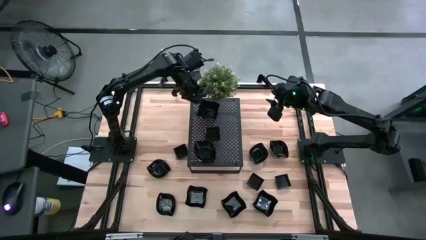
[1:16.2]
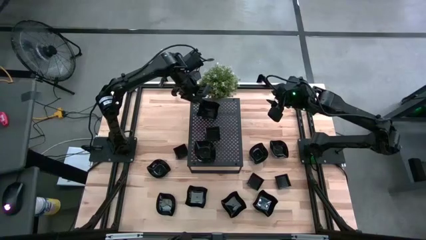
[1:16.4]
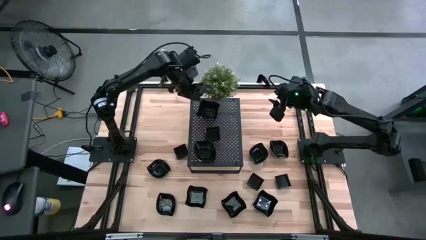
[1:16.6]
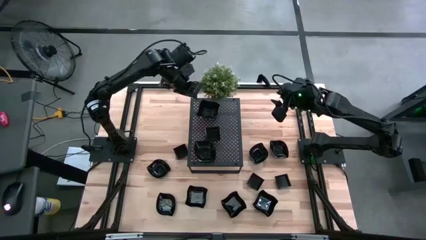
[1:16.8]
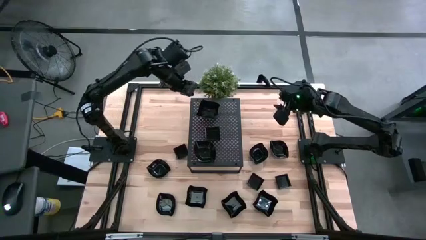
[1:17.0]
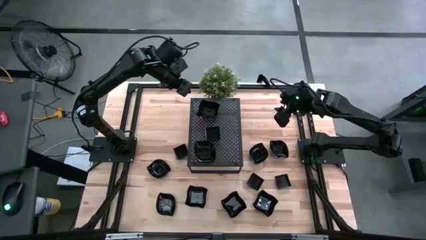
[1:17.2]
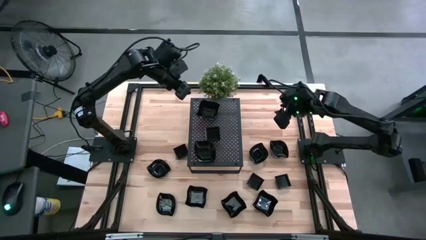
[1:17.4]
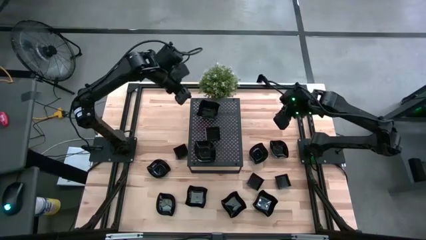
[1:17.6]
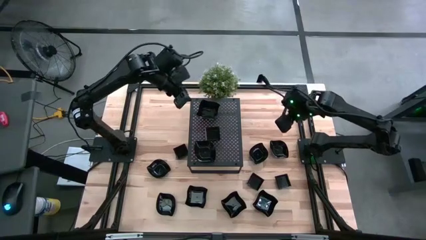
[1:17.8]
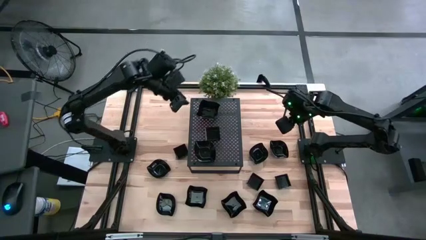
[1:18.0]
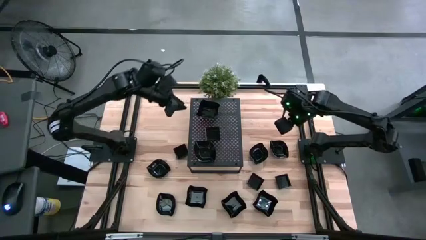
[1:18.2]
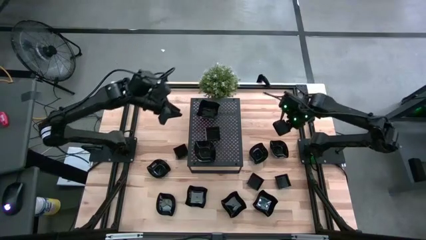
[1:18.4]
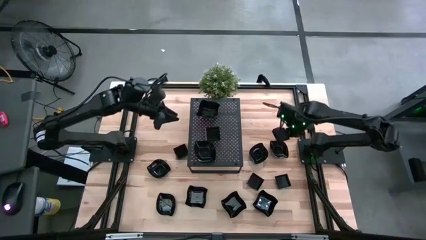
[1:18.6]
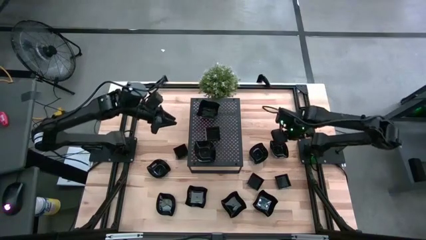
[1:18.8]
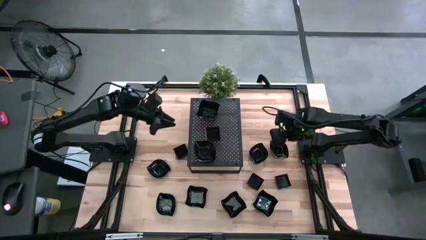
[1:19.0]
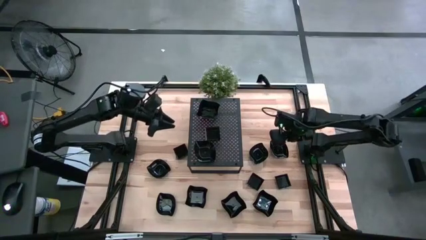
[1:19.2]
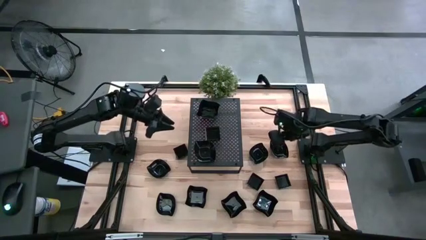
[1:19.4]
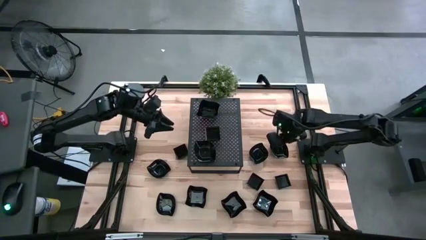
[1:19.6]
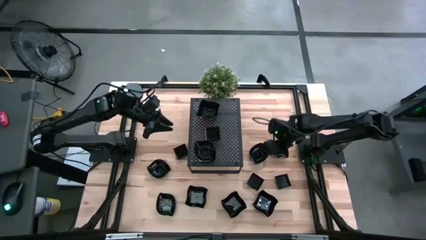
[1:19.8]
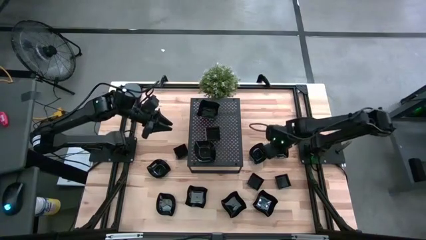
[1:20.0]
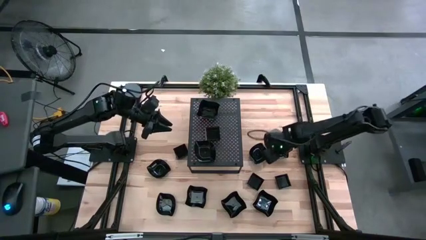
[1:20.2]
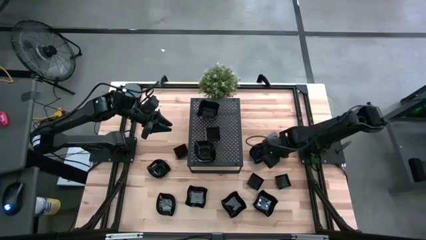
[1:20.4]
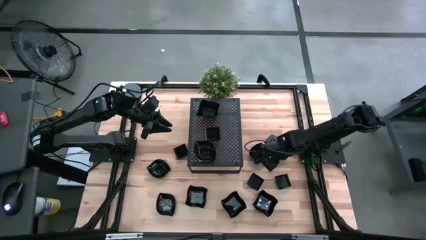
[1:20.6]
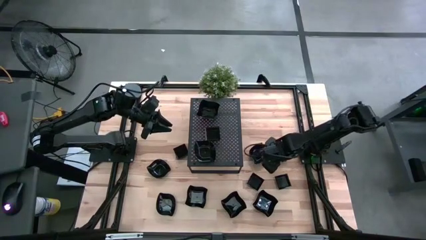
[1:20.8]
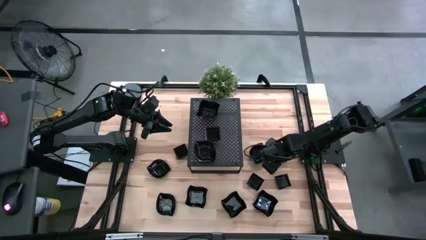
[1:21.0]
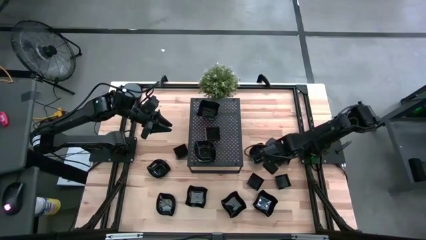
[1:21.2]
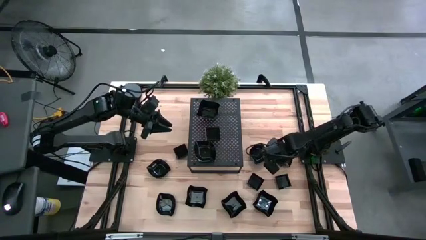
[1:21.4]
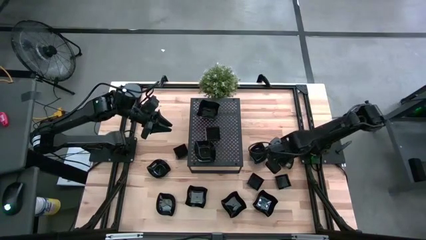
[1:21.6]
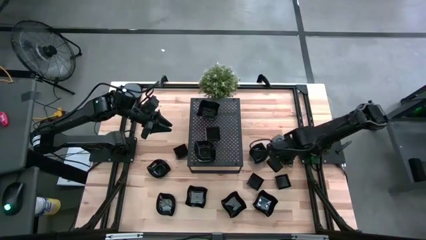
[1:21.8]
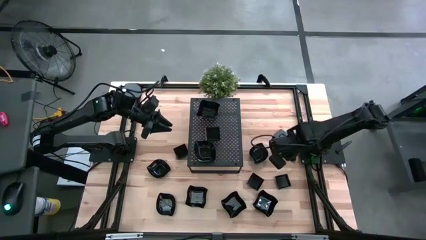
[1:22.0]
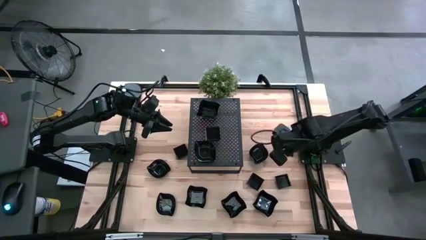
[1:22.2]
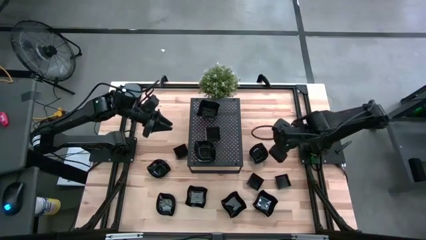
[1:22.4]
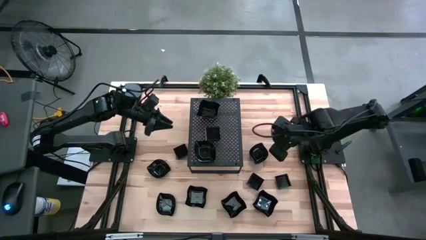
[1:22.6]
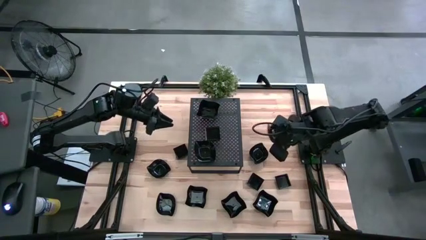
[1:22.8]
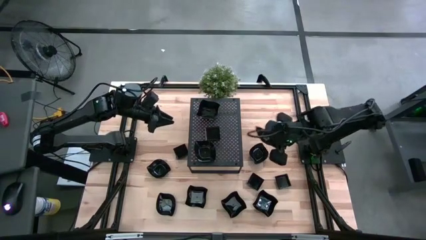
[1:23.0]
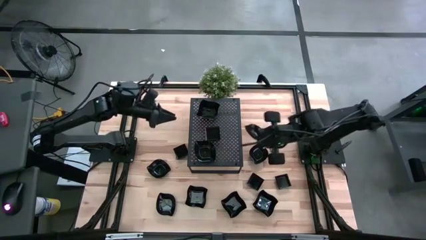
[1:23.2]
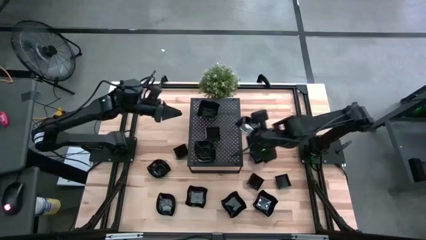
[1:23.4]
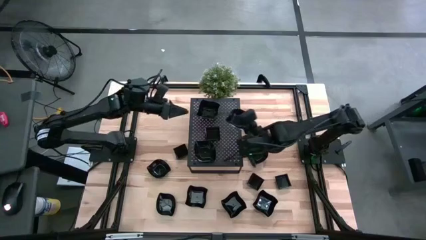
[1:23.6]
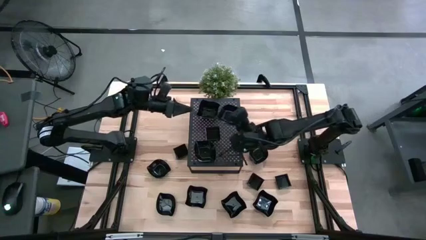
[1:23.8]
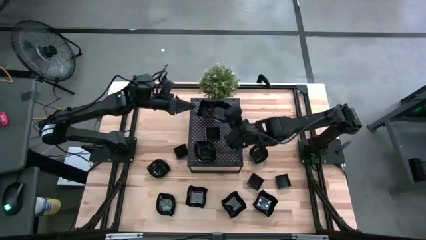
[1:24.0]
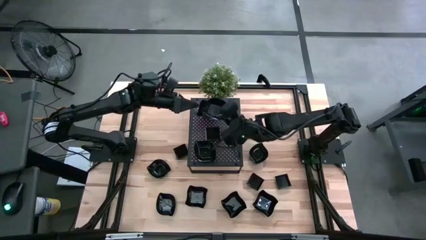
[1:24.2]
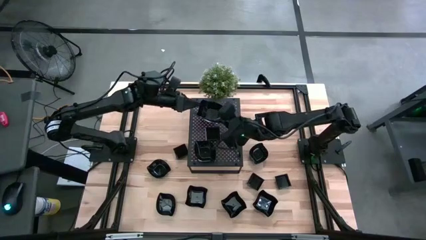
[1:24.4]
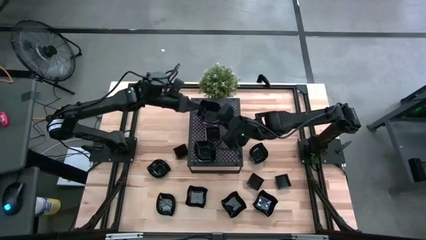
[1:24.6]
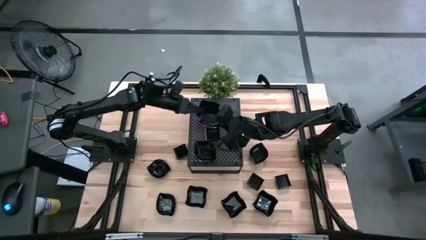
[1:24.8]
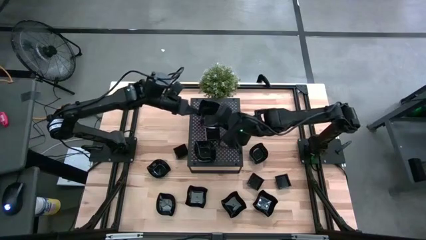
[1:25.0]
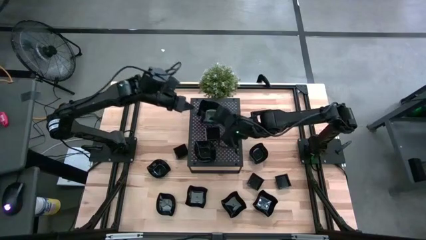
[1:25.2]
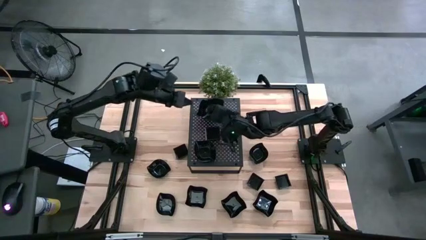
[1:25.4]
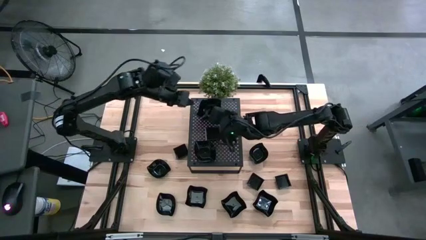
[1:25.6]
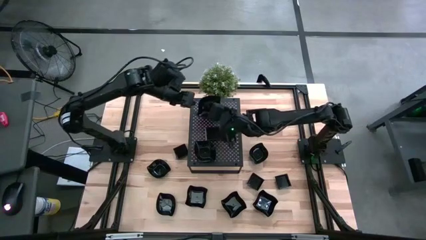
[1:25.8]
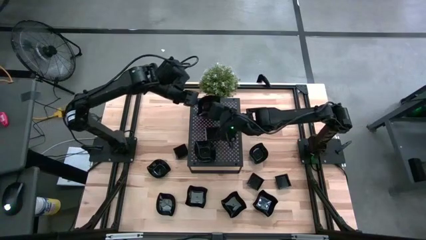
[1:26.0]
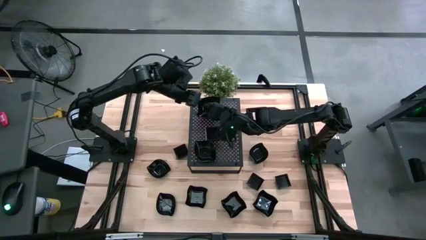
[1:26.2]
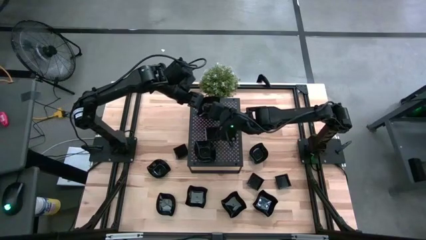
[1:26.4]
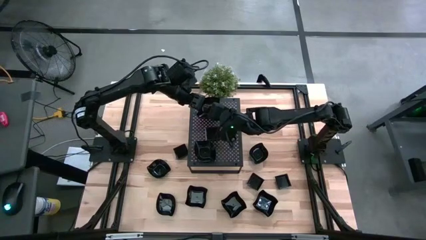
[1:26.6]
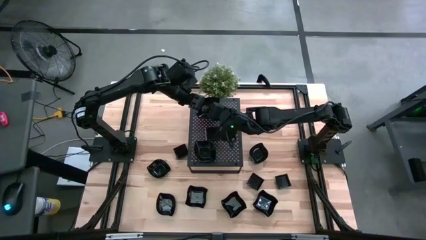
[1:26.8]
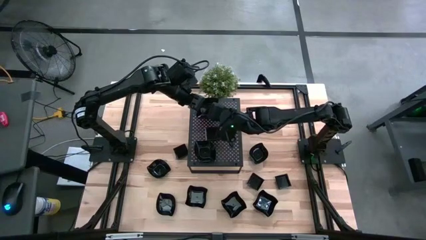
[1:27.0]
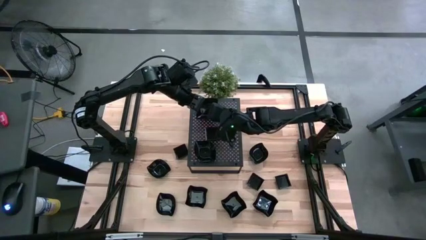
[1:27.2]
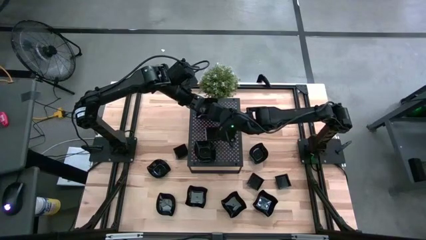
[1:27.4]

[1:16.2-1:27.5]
Task: Pick & Place Mini shaped plates
Stack the leaf-shaped plate on top of the leaf-shaped plate on the shelf

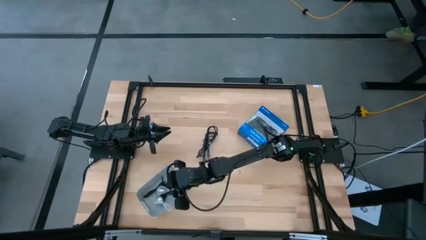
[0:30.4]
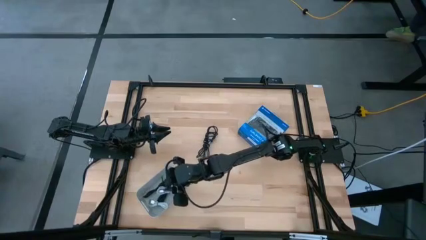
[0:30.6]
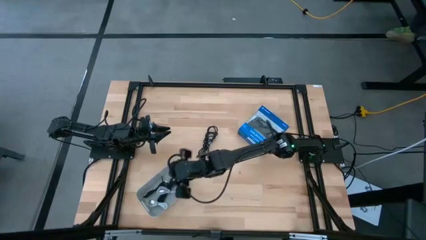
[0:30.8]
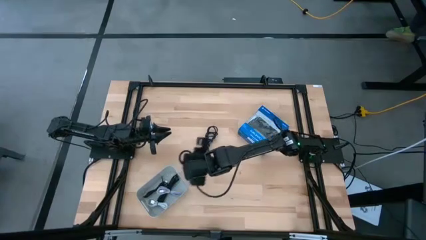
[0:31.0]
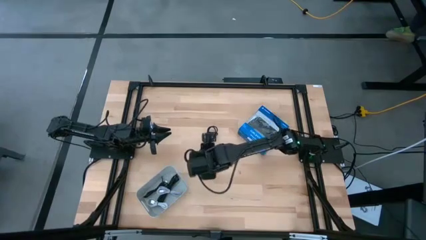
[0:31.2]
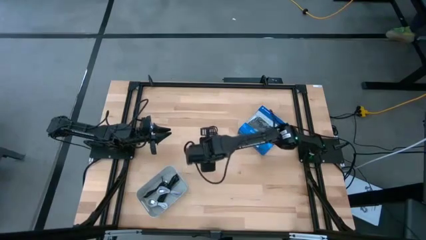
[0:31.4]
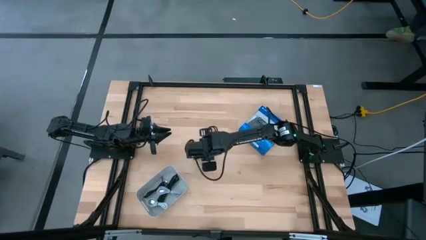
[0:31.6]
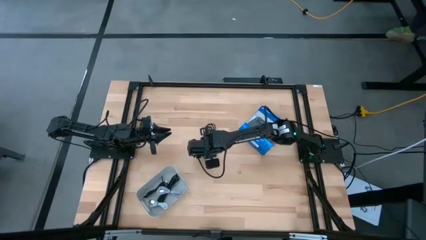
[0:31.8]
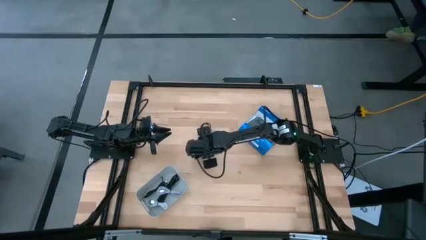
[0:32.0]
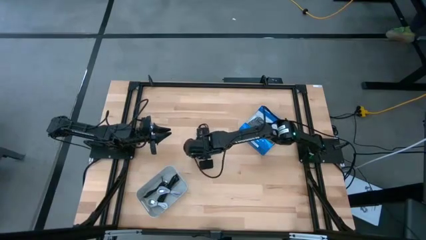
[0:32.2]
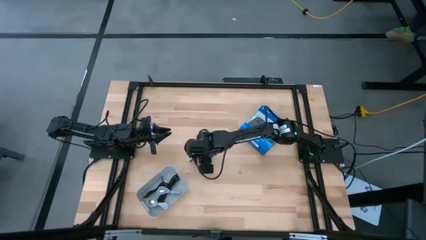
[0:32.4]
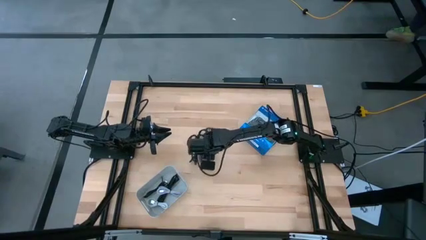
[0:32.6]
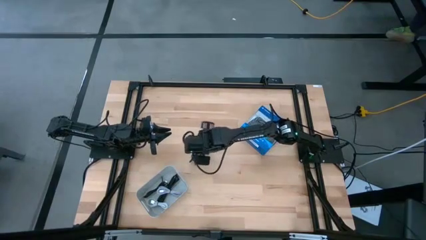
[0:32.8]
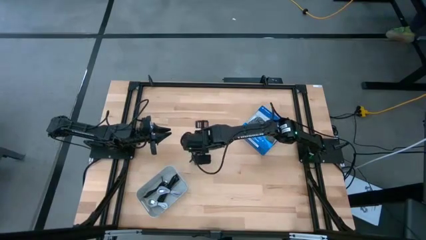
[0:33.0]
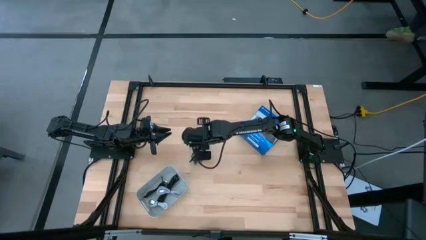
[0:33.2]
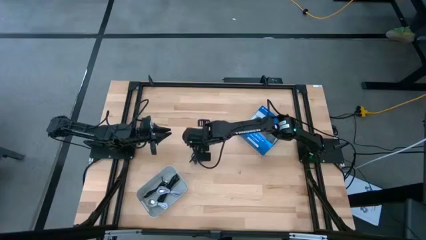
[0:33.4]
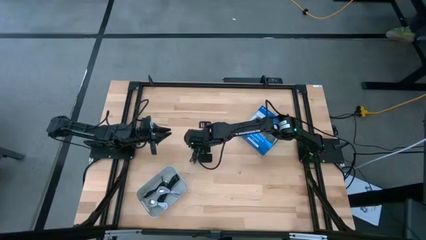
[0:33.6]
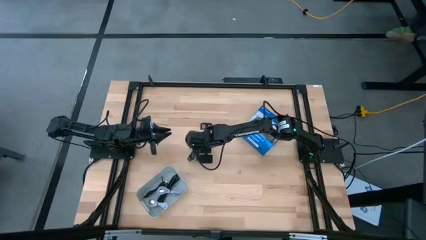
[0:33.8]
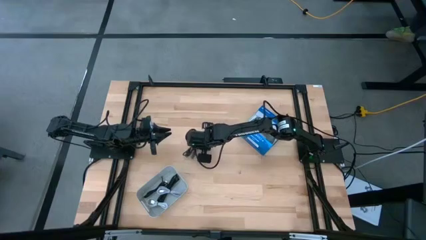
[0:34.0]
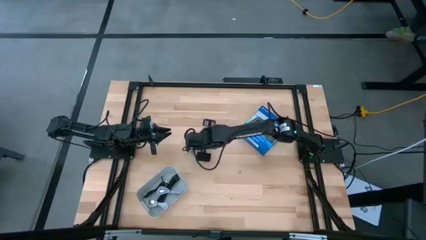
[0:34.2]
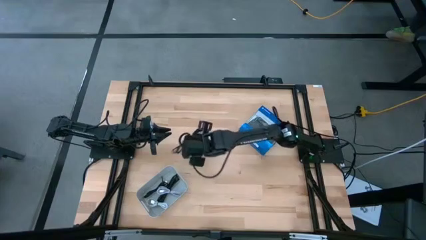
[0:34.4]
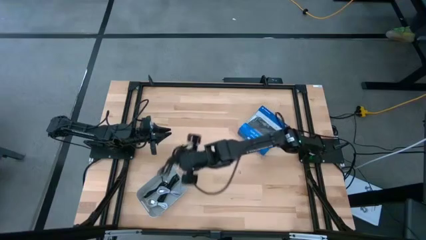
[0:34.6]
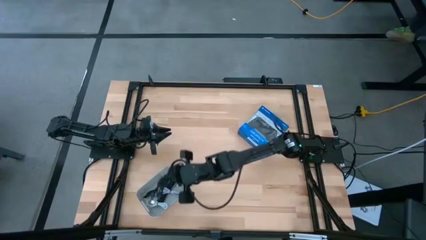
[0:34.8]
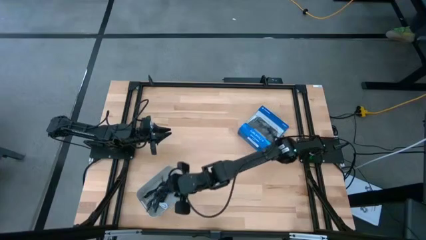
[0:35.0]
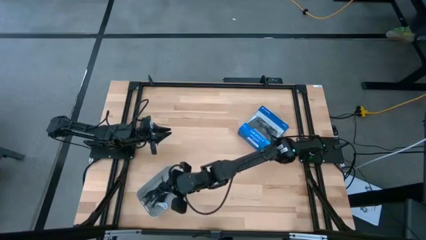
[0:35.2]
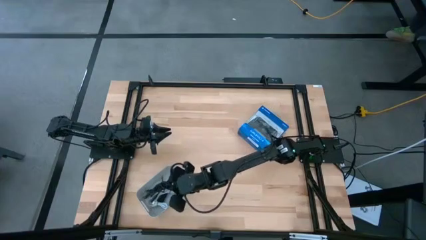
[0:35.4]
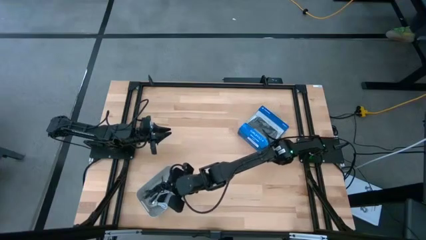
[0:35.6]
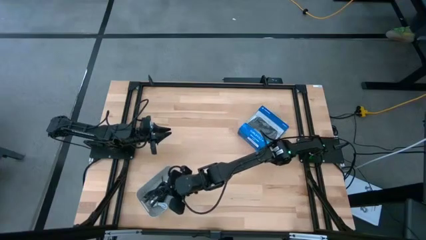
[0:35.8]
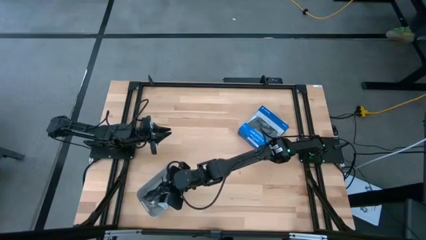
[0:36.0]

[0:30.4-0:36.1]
Task: Pick and place USB-C Cables
Put the black charger cable into the white bin
